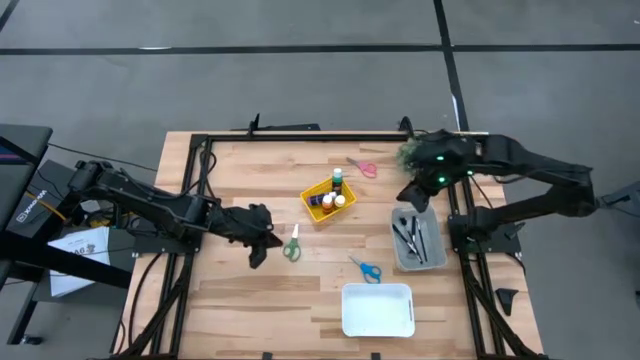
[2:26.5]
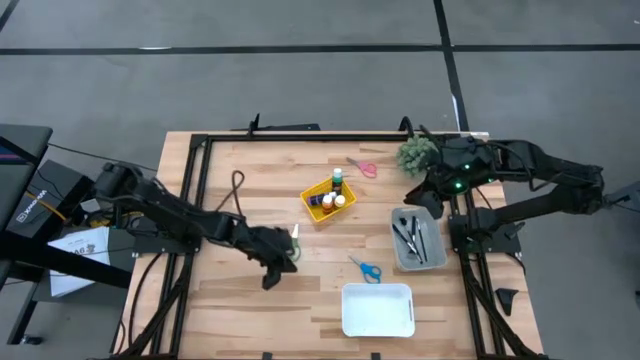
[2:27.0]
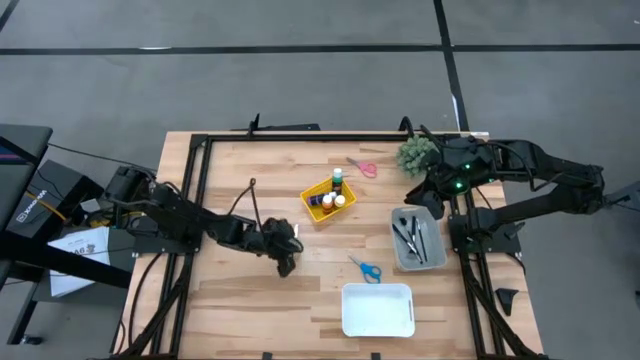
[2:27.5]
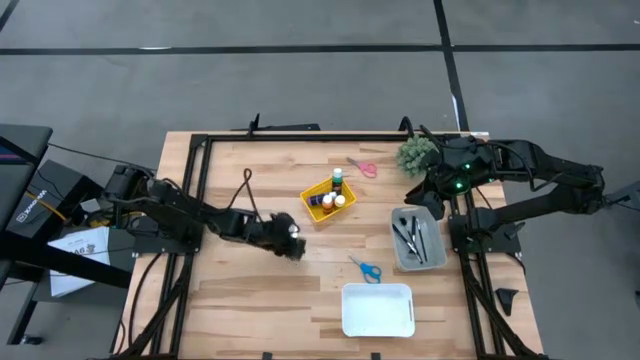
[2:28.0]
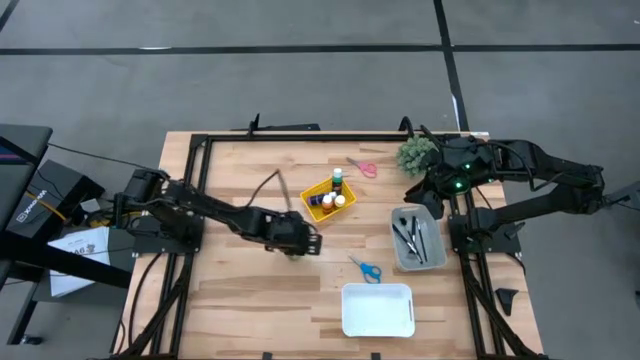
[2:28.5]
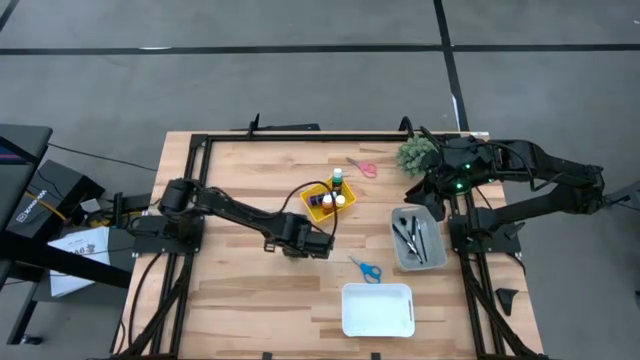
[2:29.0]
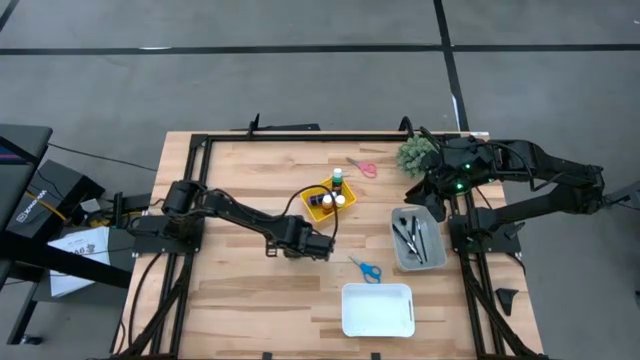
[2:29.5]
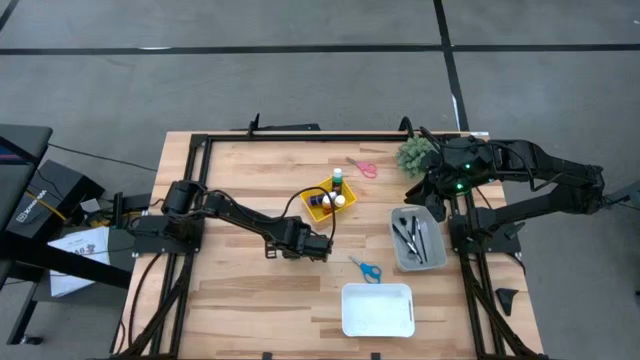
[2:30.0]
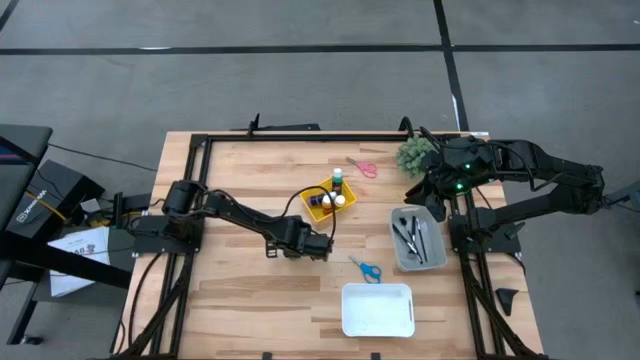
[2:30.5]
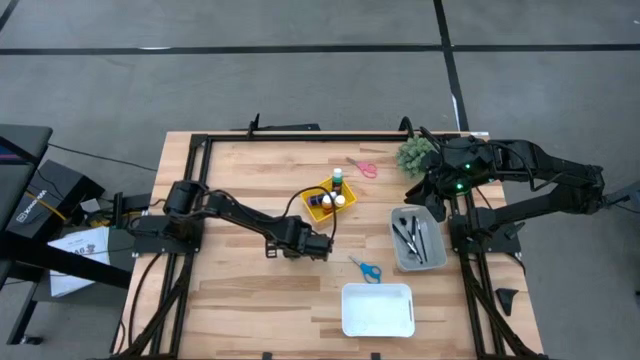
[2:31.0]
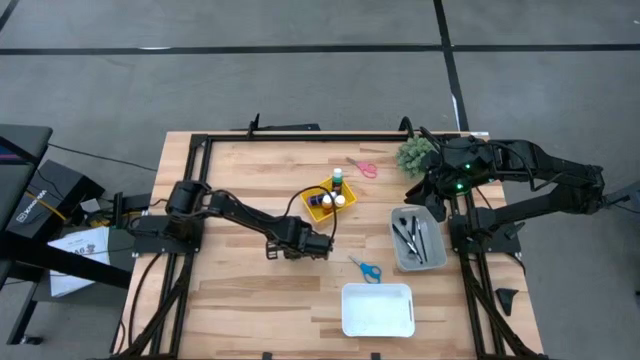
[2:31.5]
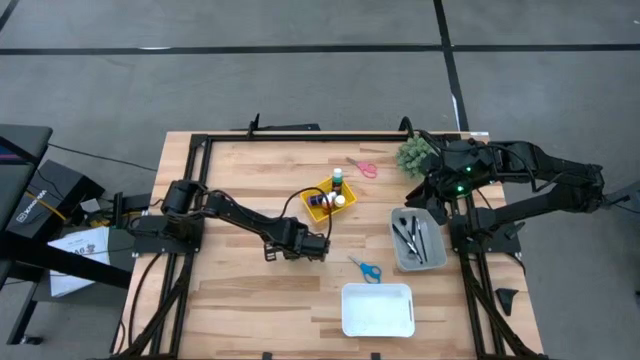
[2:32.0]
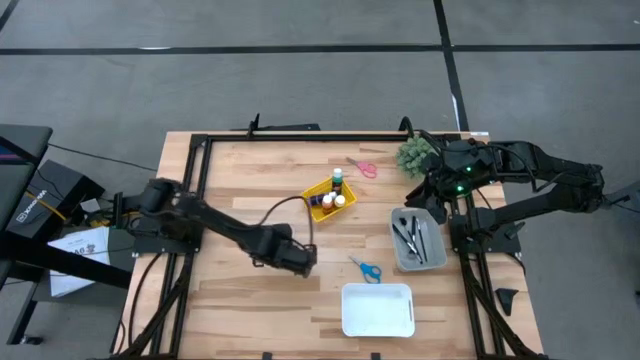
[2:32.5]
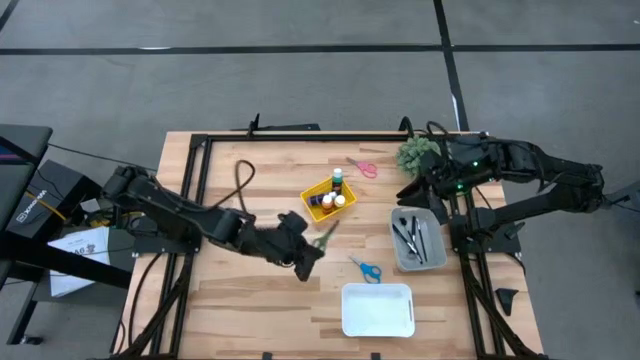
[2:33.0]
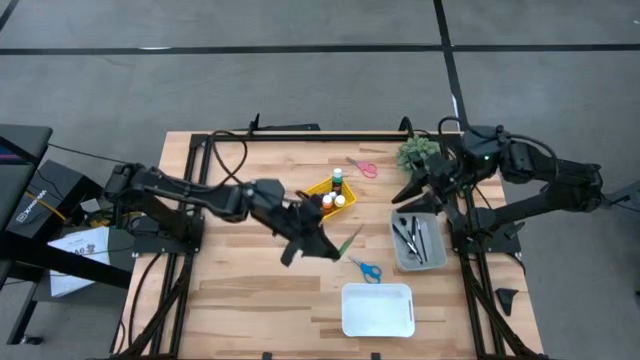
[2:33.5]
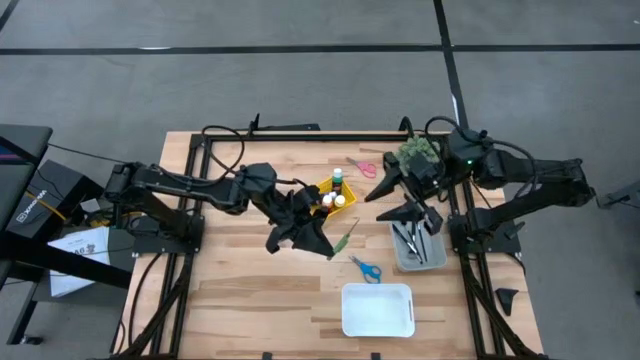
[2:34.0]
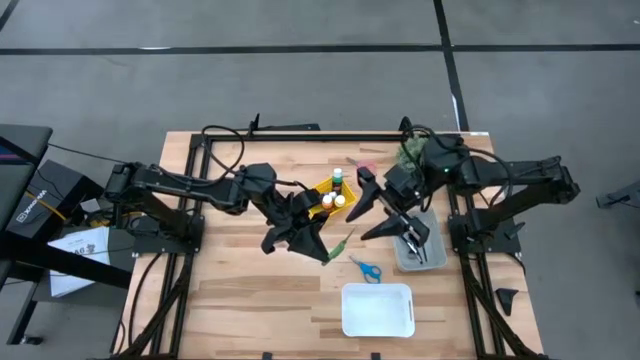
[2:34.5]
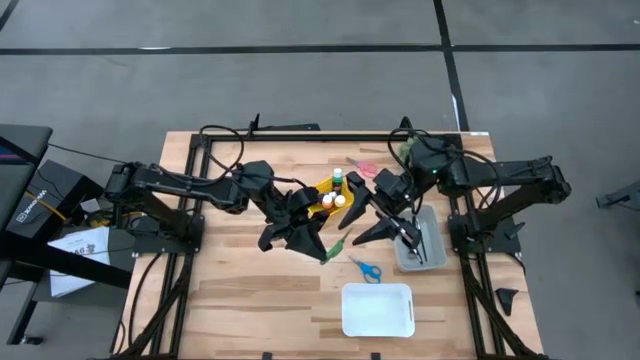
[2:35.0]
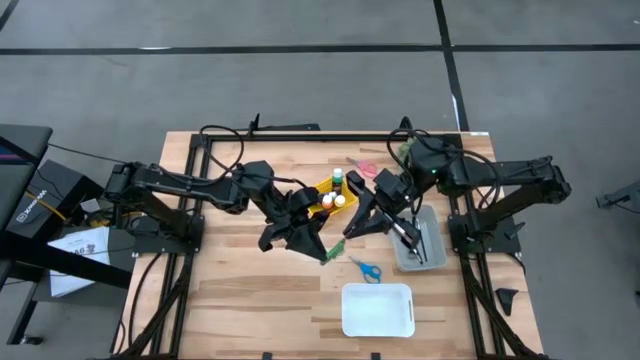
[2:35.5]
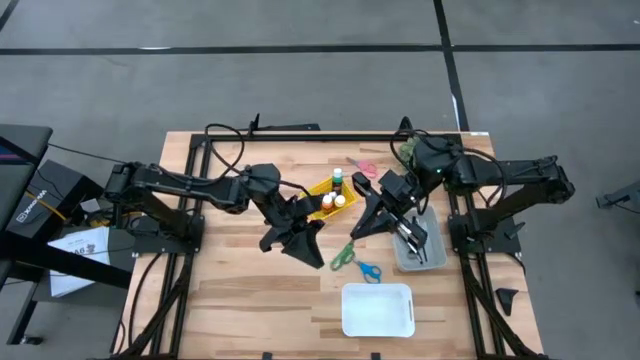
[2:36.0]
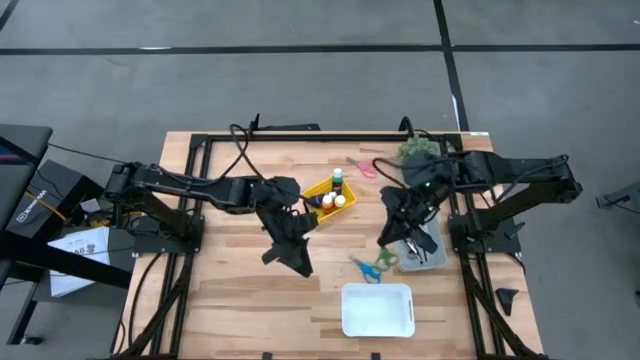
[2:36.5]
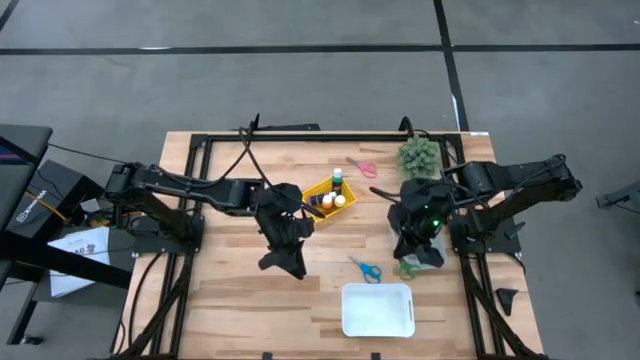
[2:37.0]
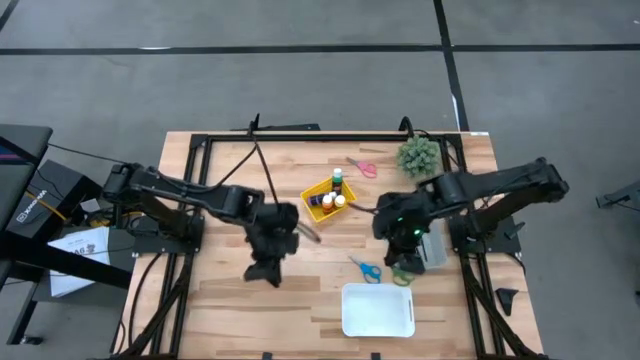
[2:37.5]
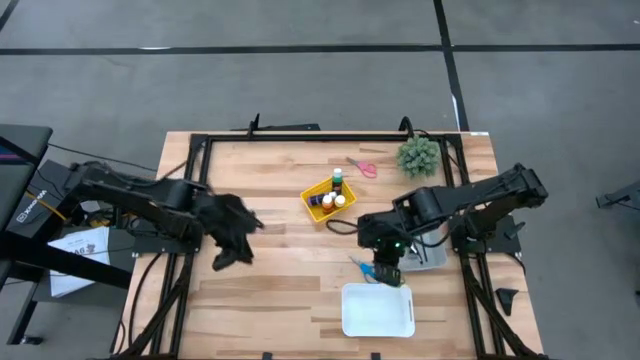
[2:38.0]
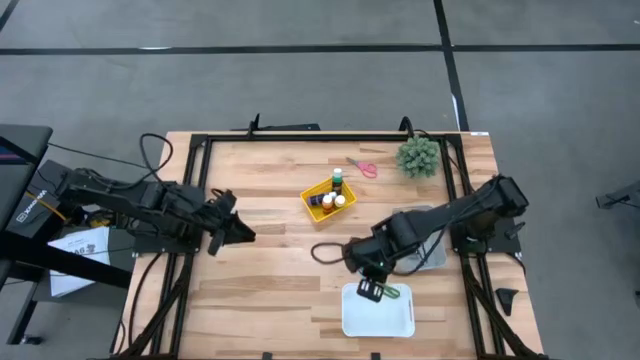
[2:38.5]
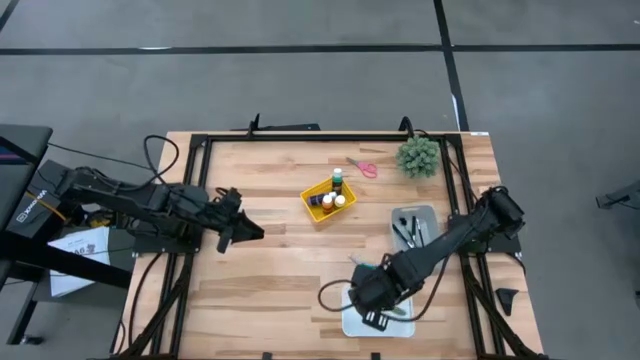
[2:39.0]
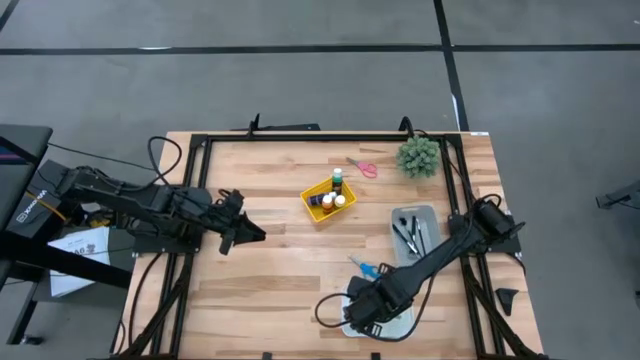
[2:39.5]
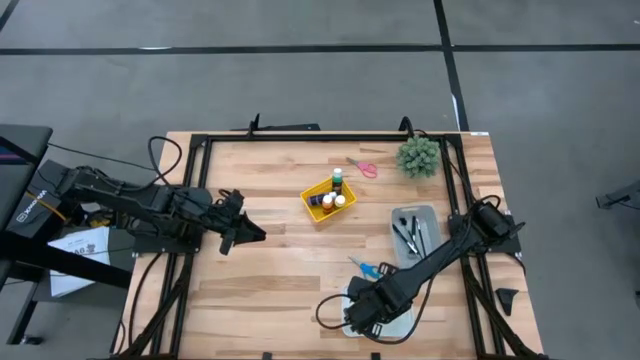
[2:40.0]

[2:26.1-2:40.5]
Task: Pick & Place Paint Supplies
Put the green scissors into the white bin

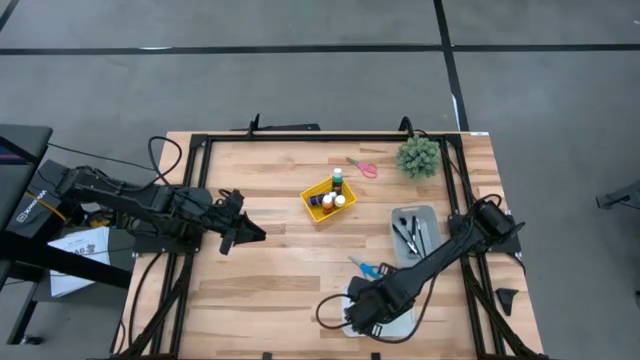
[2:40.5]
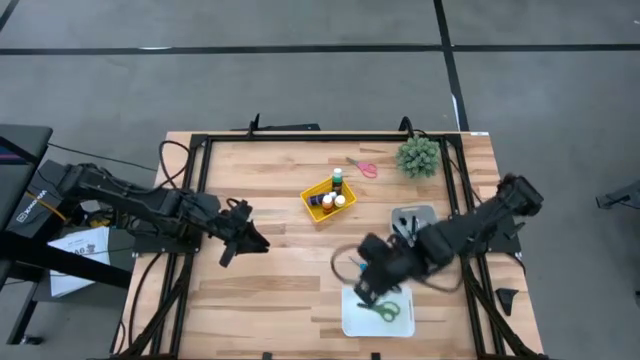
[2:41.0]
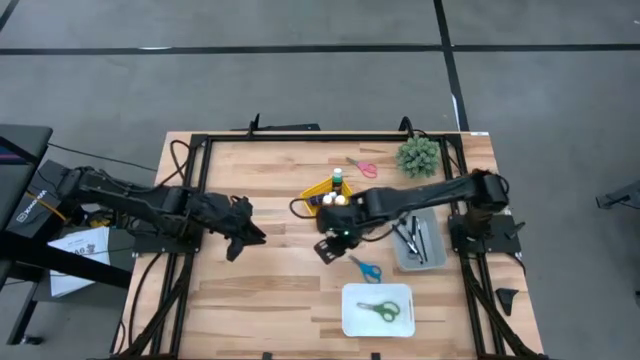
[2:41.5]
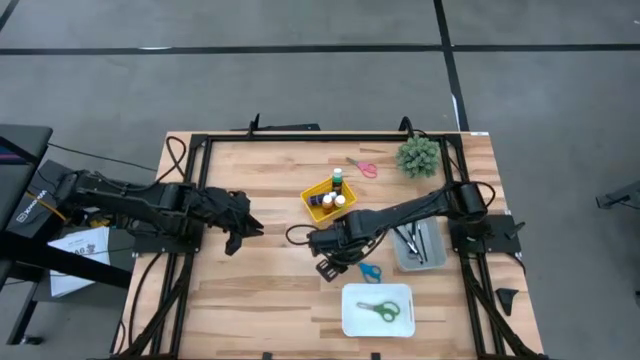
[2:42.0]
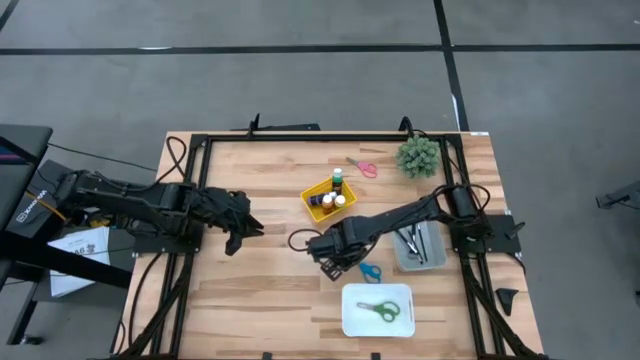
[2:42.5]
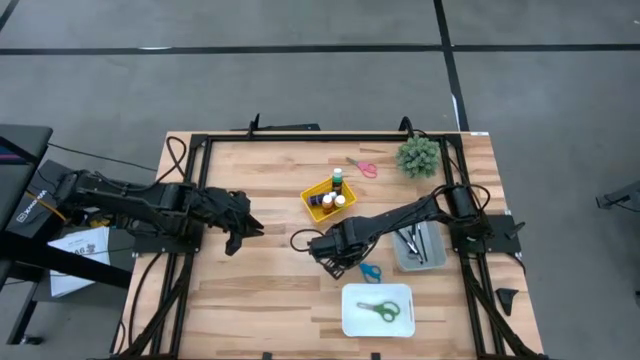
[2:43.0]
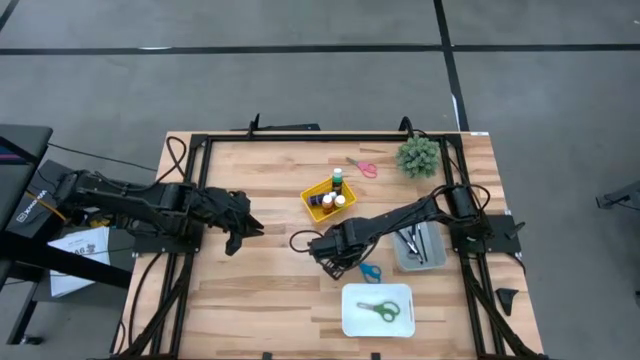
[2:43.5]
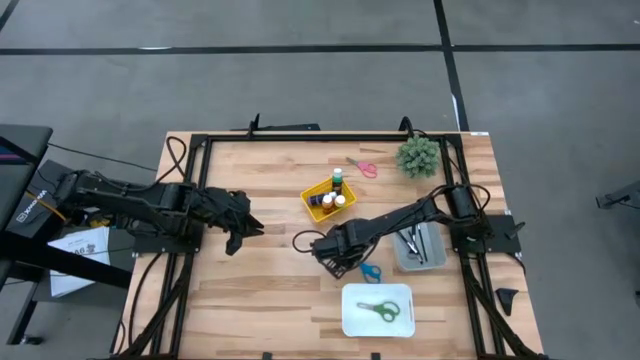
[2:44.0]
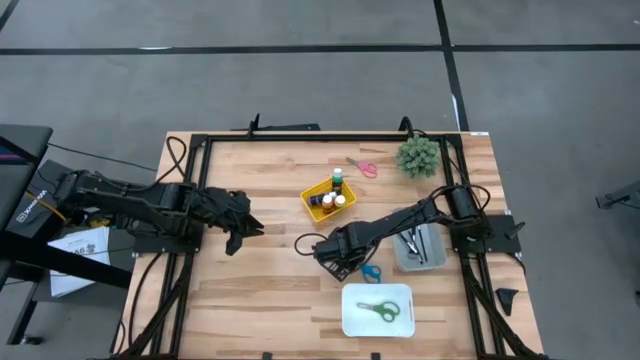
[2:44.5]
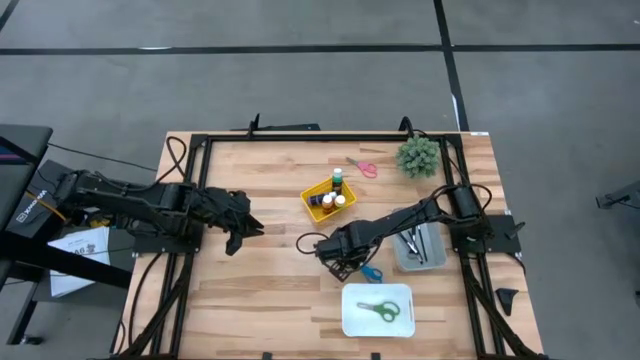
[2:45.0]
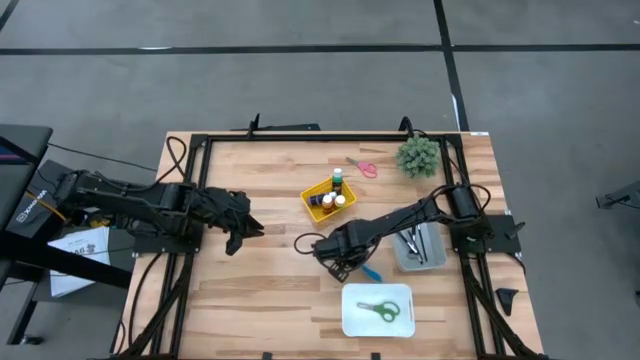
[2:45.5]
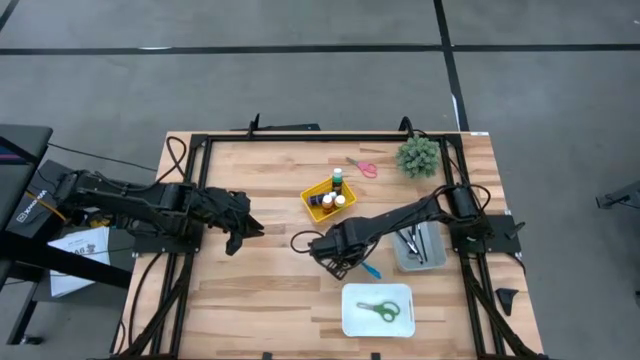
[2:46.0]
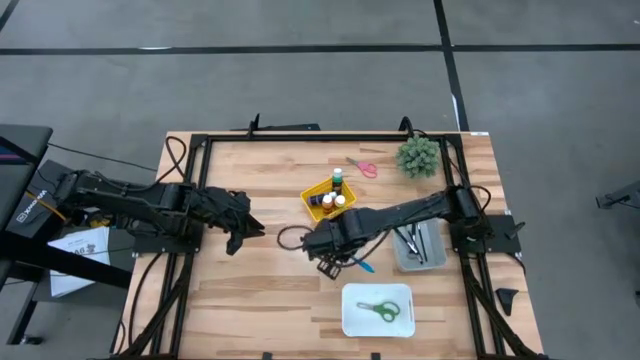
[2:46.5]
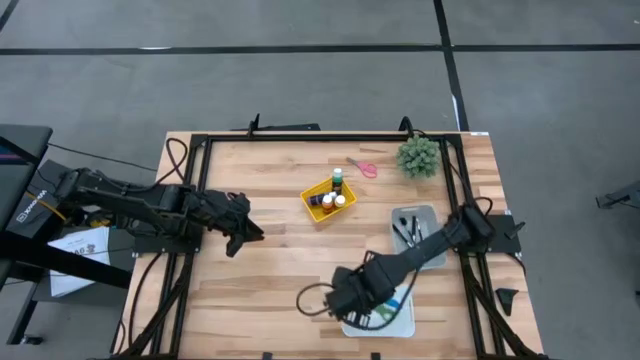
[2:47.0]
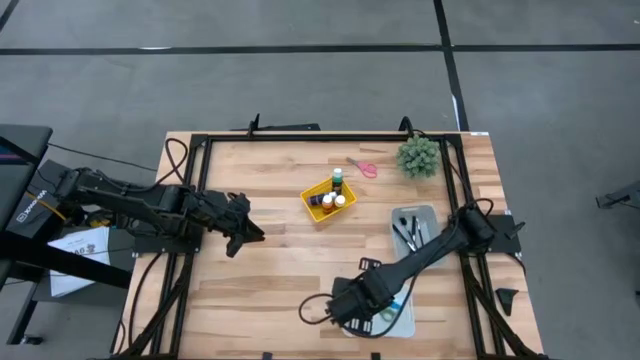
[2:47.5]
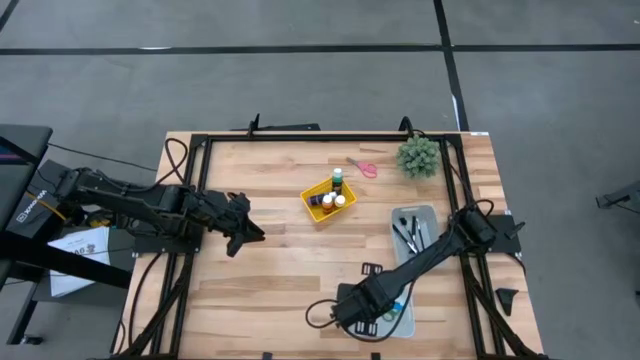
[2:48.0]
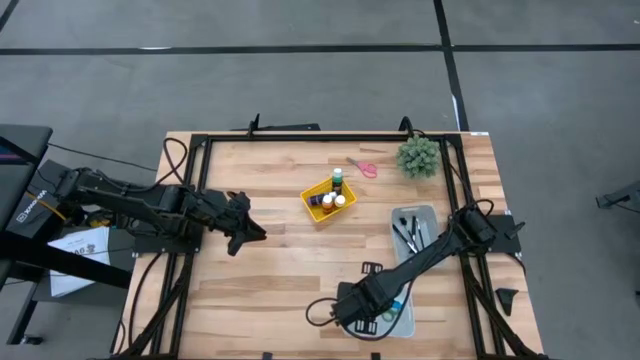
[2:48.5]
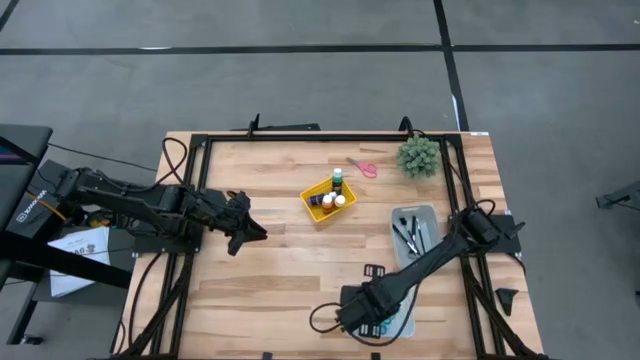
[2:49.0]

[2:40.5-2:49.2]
Put the blue scissors into the white bin
